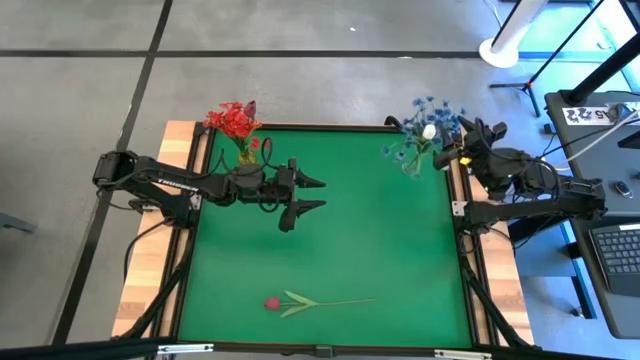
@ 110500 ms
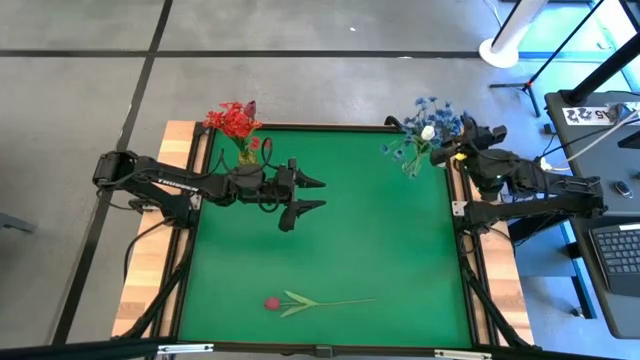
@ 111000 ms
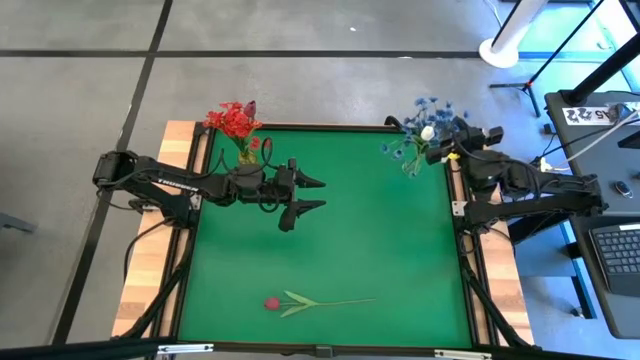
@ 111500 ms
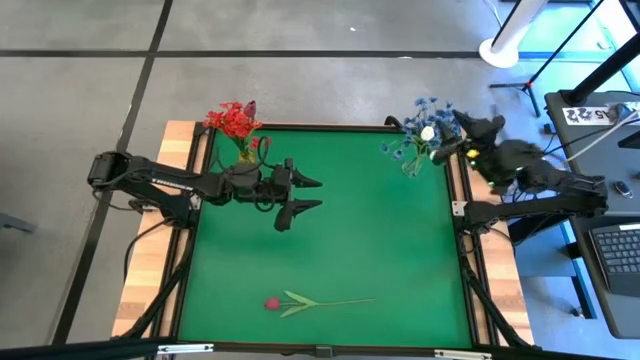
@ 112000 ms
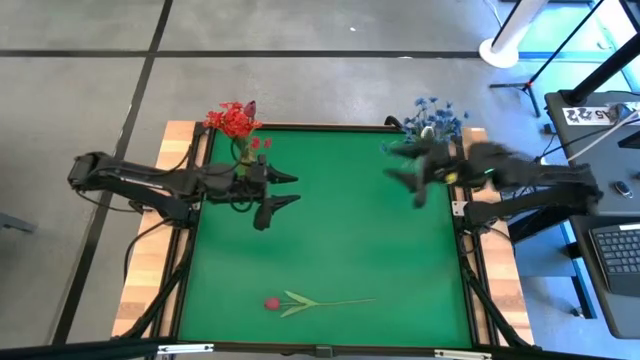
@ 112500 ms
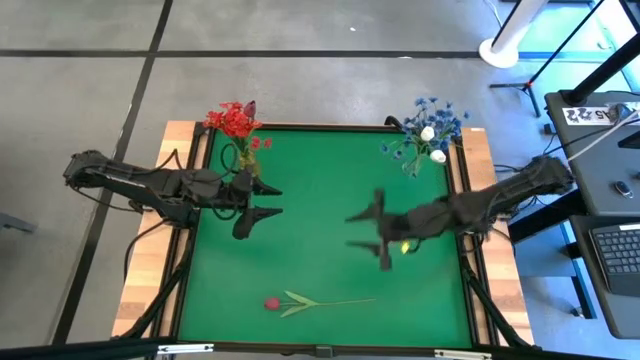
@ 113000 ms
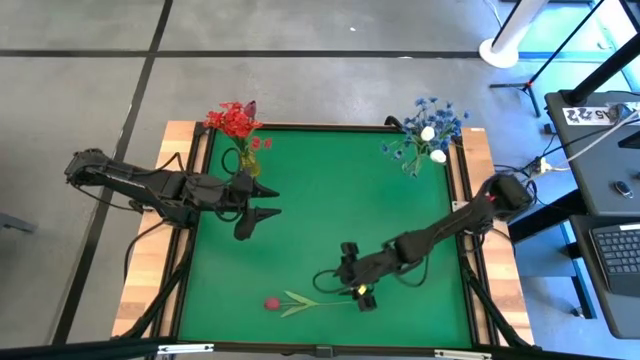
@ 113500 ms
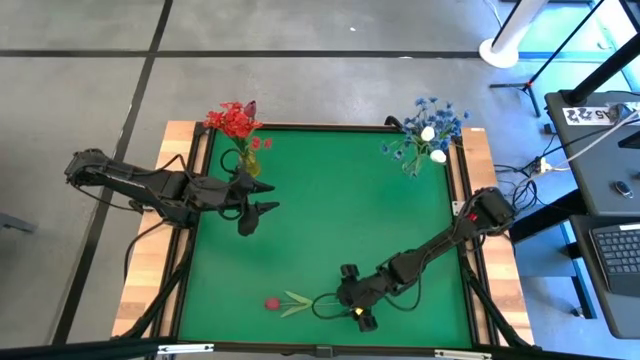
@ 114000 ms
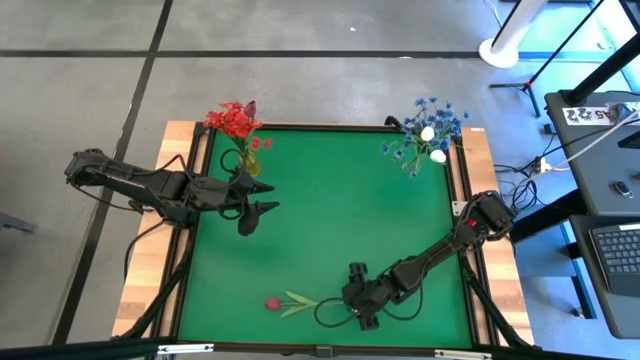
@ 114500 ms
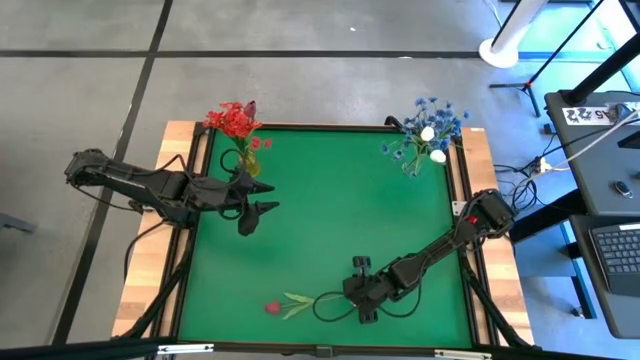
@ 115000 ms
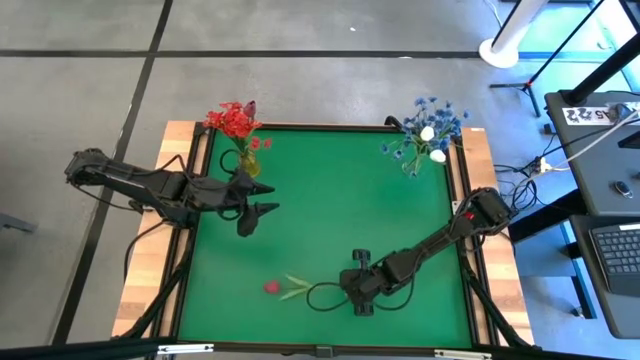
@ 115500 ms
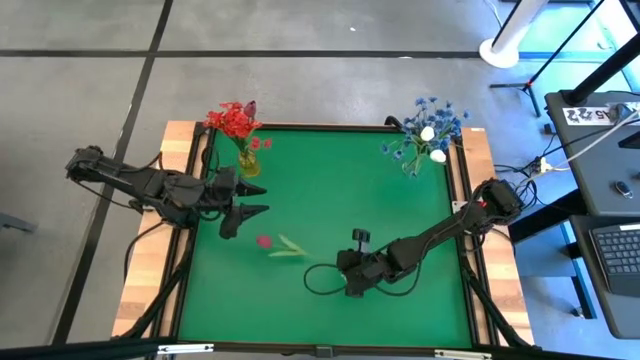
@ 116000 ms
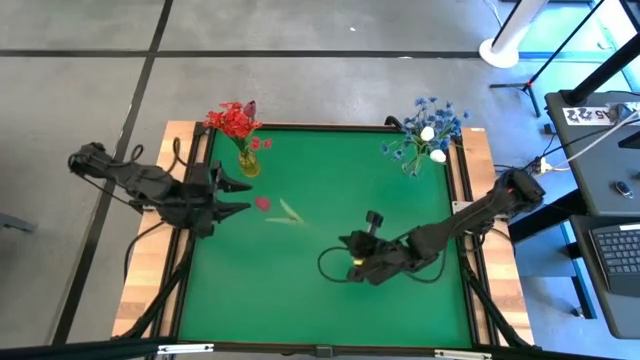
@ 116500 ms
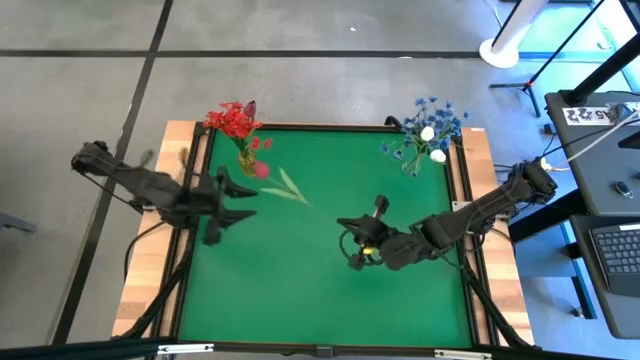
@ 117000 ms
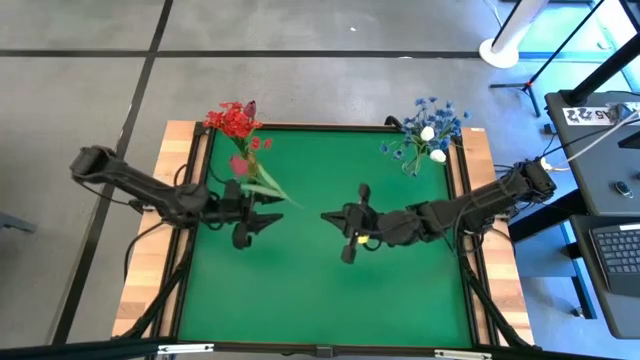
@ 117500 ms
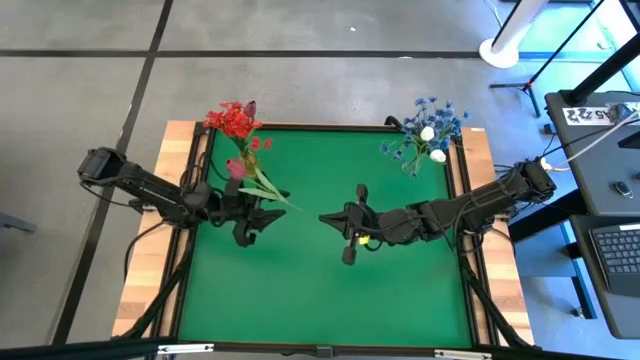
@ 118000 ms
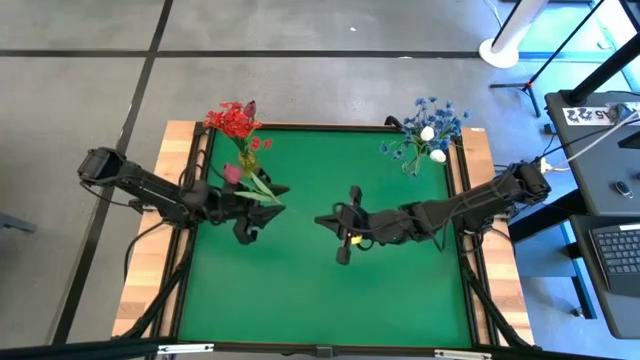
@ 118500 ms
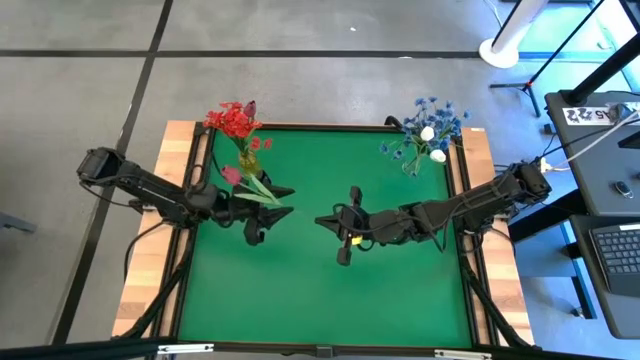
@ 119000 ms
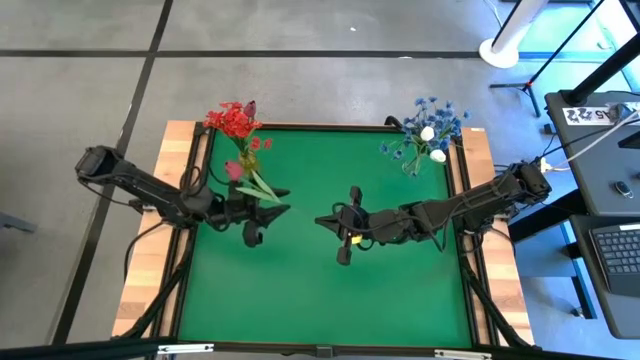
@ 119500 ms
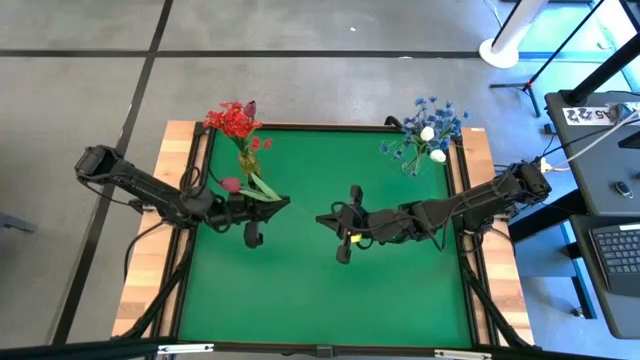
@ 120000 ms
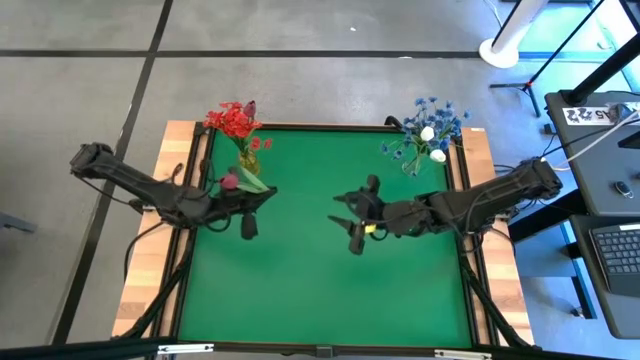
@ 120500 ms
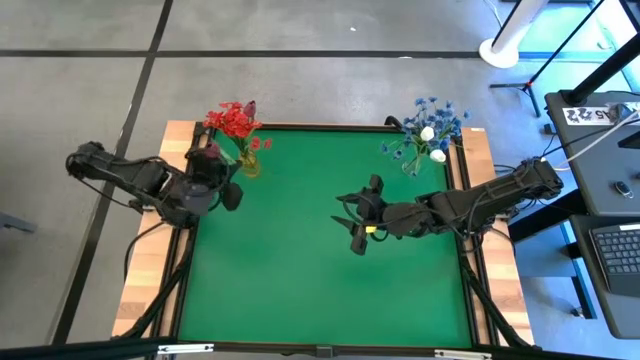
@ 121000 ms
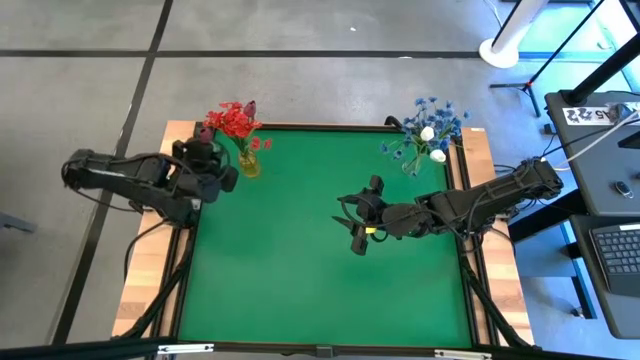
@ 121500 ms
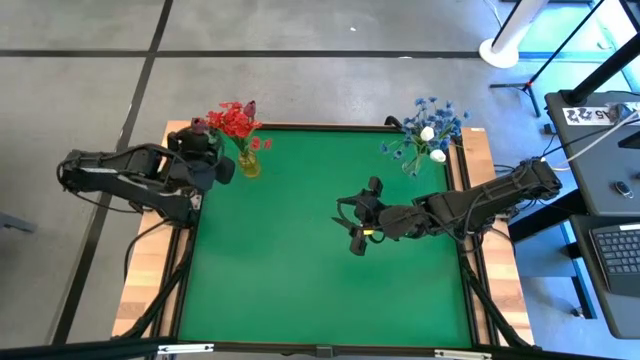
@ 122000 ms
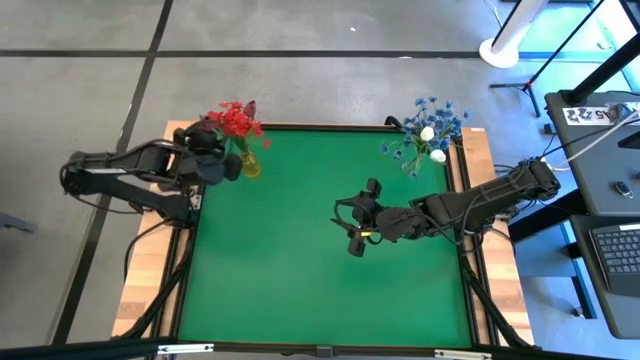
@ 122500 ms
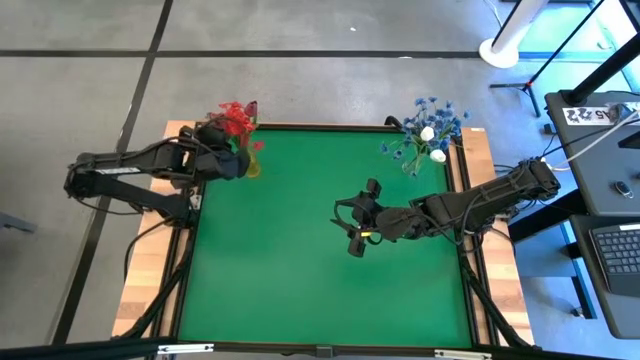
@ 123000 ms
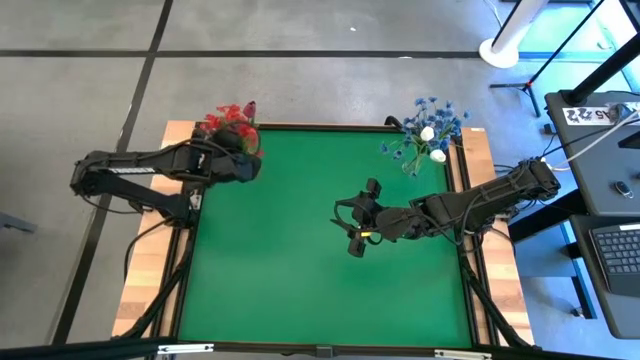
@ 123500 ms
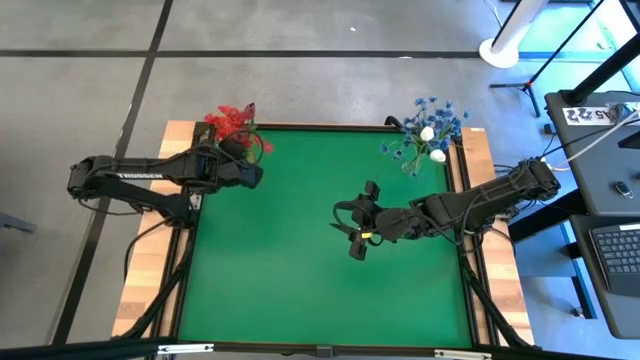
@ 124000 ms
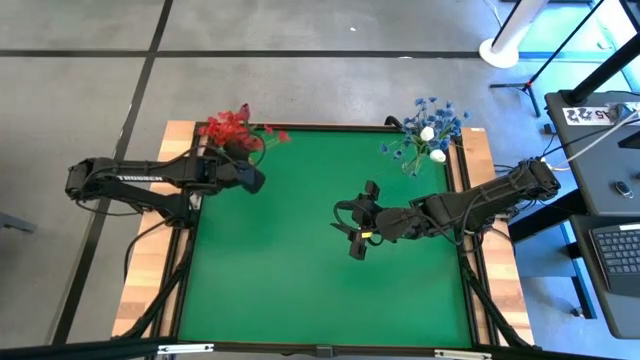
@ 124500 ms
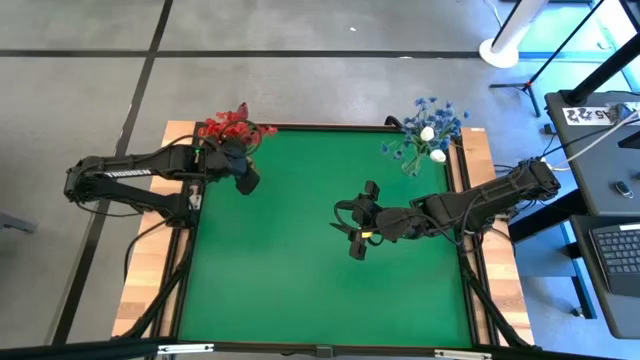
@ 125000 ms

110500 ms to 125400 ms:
Task: Sort flowers into vase by color
Put the dark red flower into the yellow vase

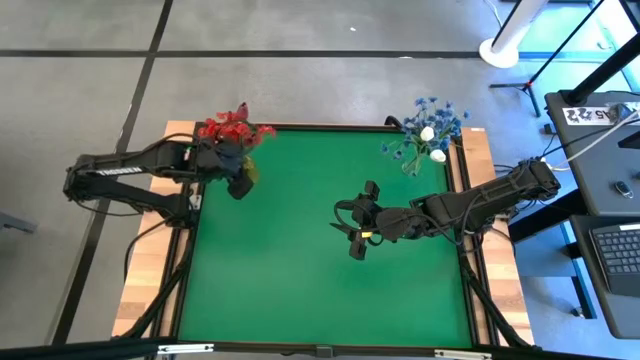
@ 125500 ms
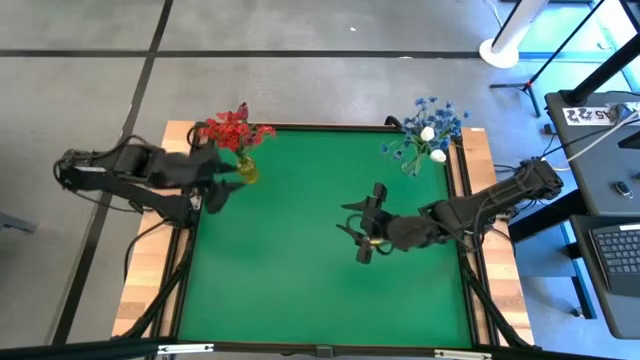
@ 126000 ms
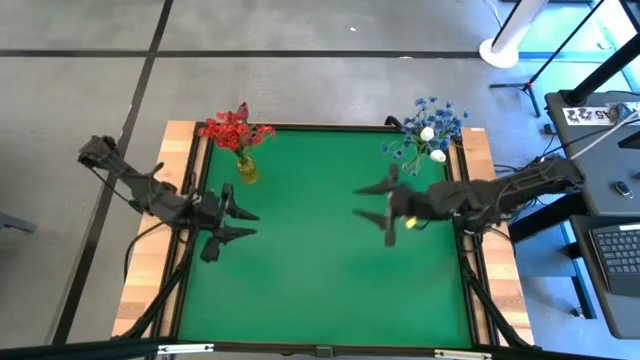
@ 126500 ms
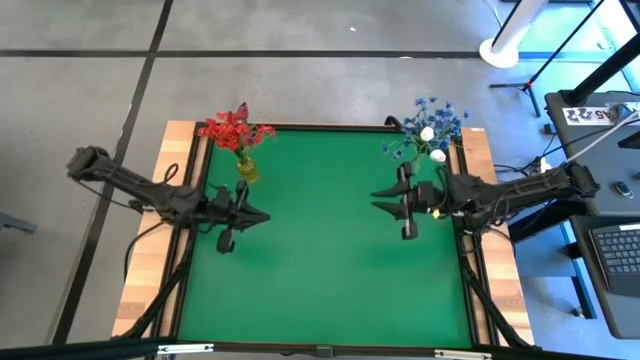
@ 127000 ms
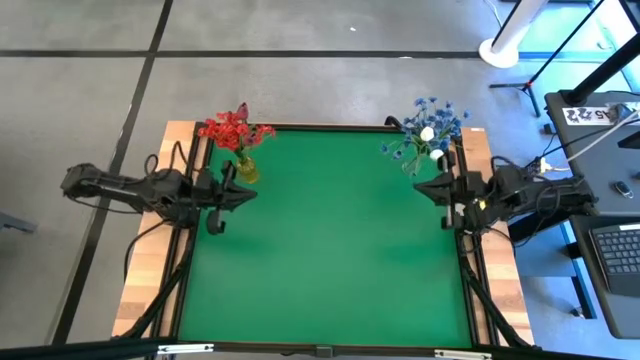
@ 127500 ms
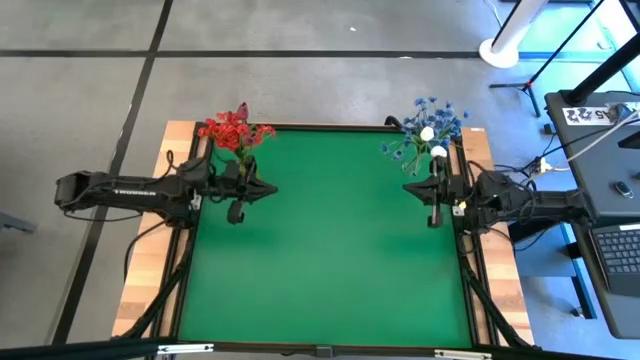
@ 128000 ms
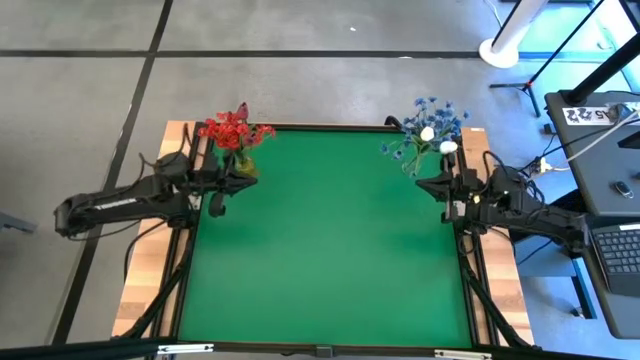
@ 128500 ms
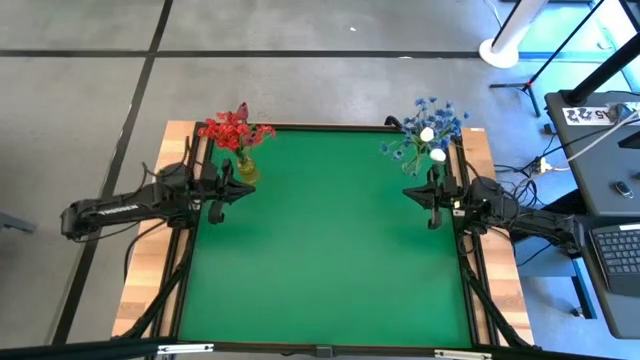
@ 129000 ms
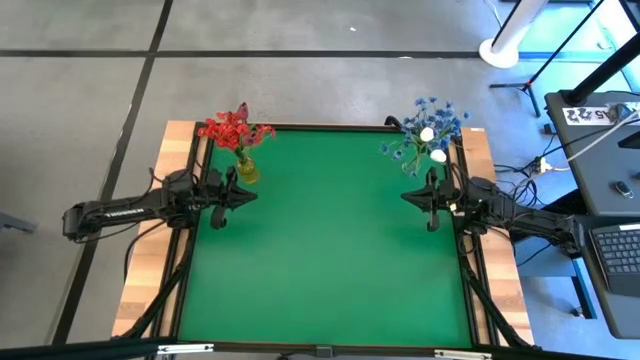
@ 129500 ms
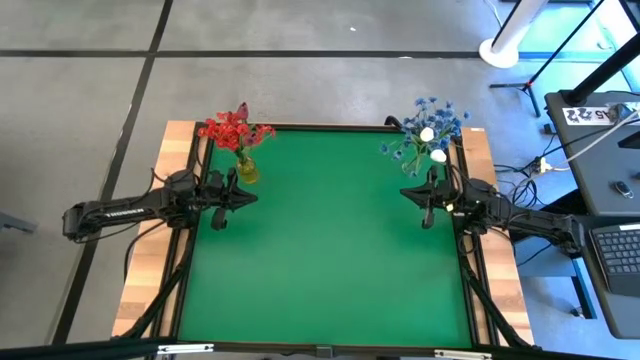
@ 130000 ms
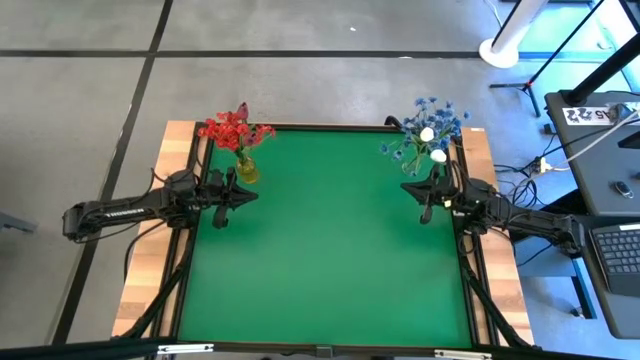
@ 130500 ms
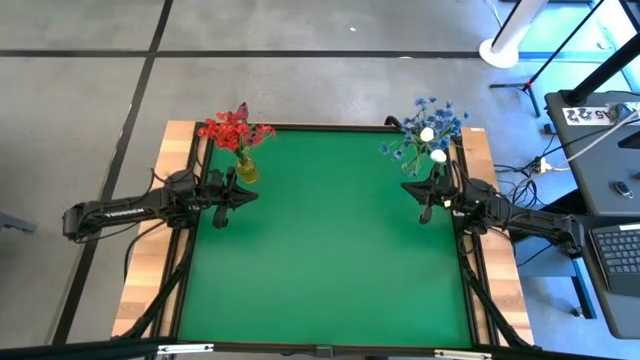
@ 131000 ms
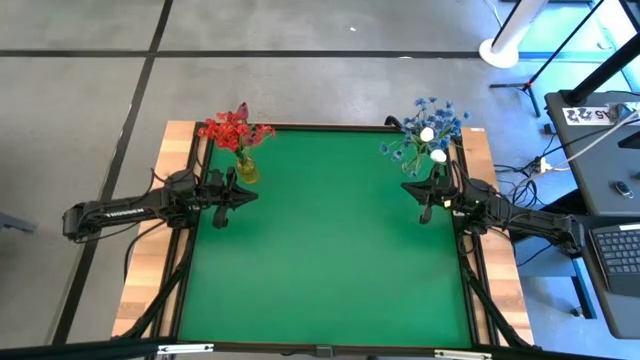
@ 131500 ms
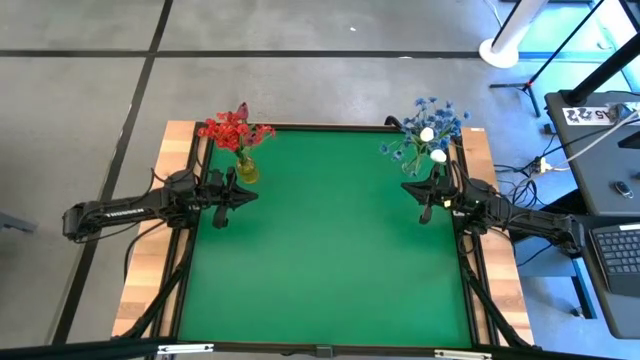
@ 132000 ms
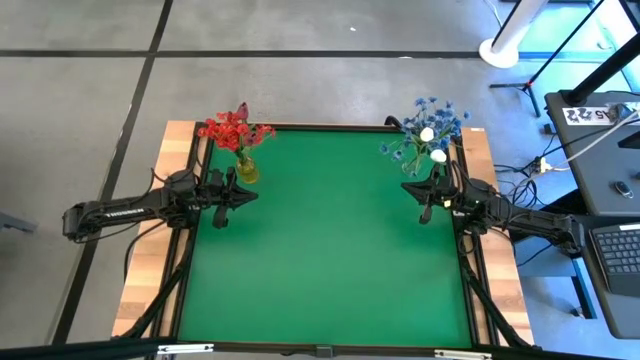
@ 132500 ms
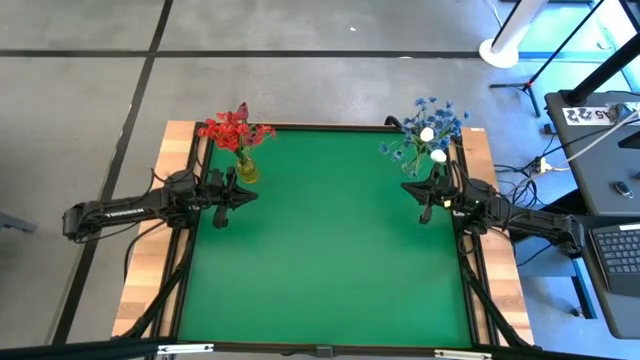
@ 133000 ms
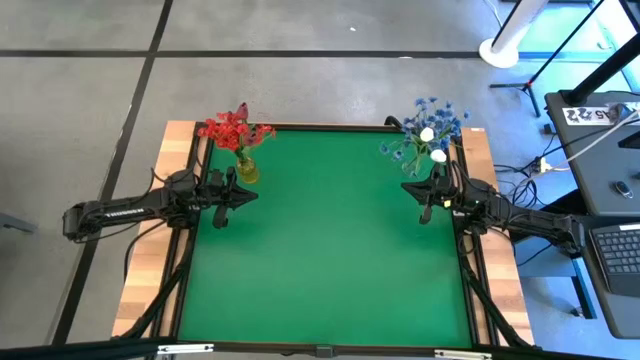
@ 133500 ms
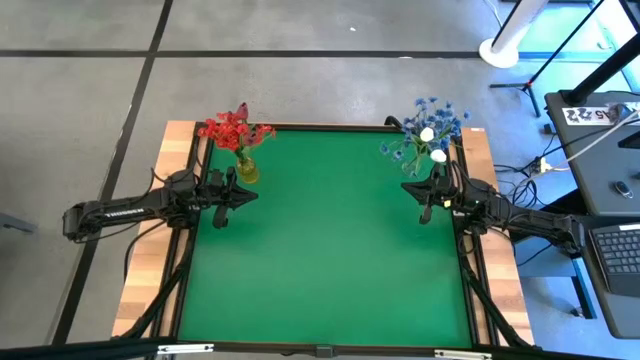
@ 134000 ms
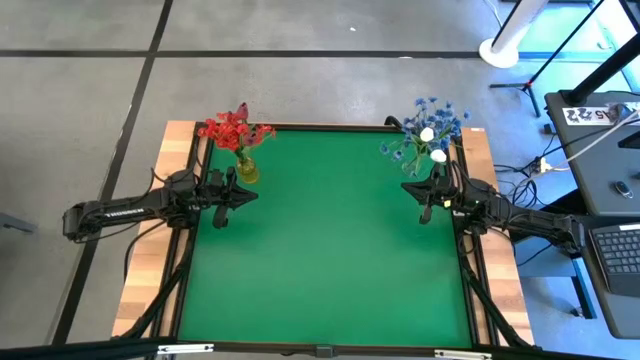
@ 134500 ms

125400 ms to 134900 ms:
Return to Home Position
